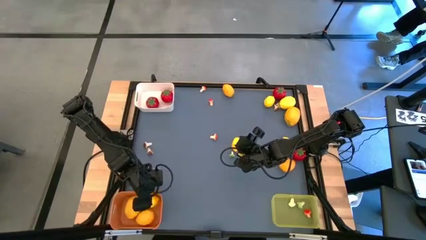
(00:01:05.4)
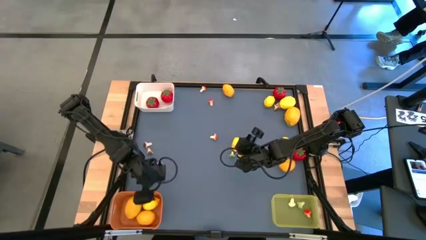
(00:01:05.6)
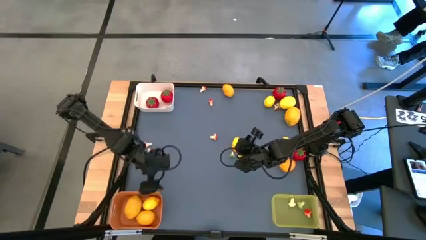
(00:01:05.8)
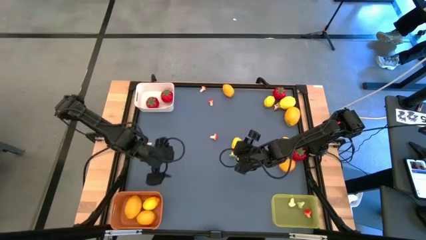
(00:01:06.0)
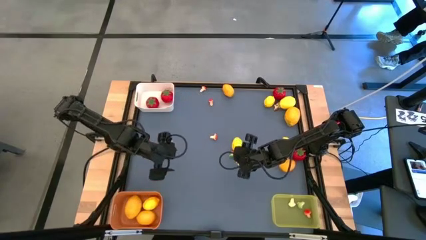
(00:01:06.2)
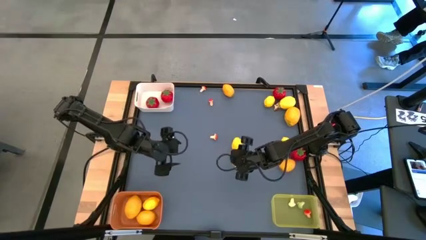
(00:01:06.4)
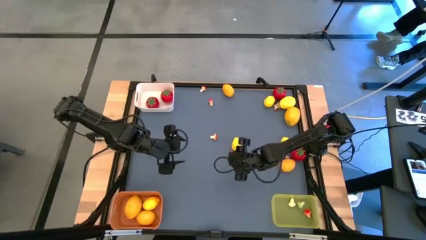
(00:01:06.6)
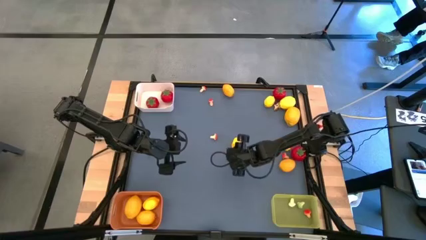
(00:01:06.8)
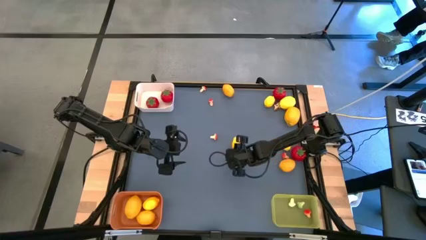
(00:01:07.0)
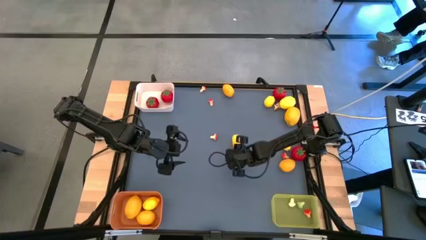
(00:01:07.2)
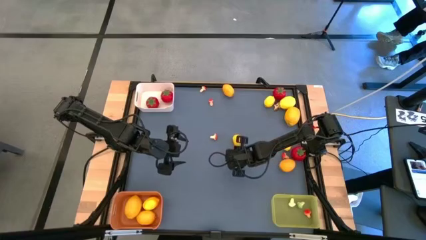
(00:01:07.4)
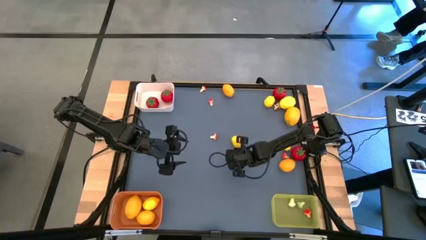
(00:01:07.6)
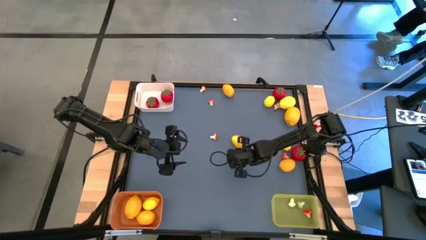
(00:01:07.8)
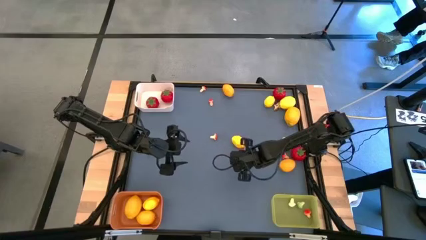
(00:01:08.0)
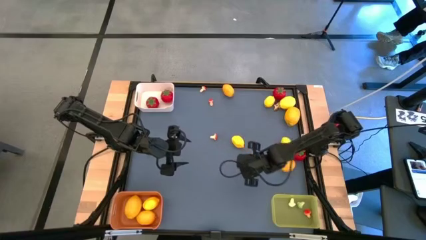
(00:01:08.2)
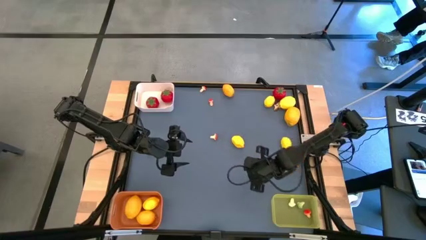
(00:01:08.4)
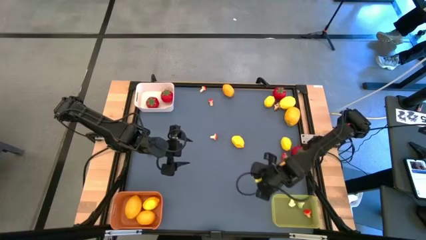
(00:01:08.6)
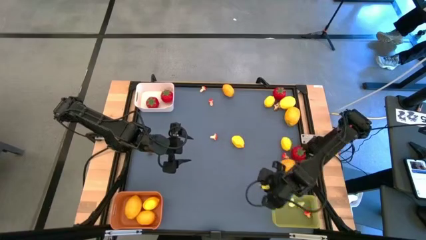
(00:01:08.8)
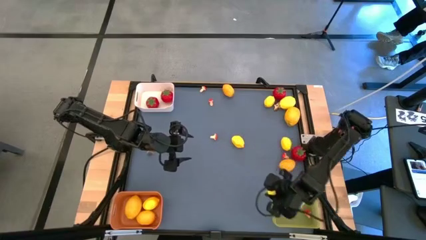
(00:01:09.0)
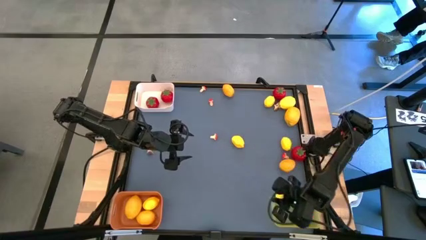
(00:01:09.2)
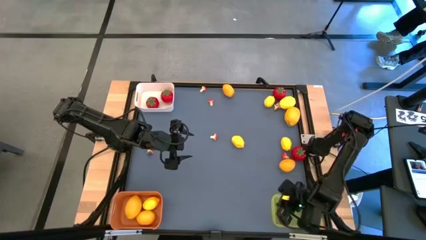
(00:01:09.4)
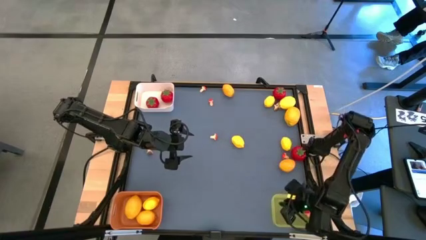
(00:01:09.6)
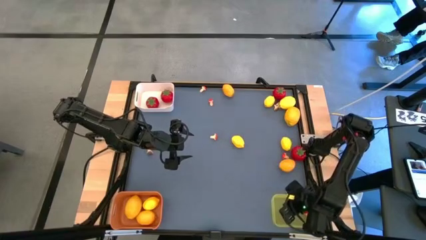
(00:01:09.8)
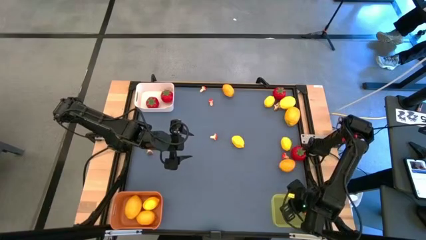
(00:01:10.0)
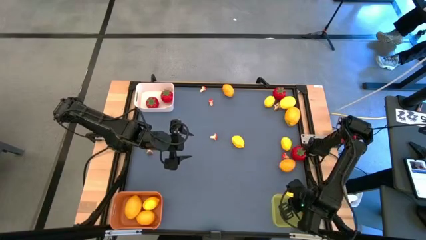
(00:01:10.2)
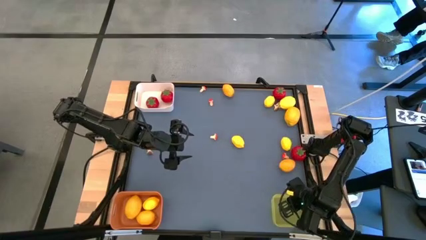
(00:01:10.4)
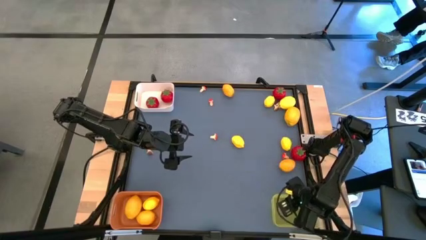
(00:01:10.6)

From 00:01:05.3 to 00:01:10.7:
Task: Sort produce into baskets
Put the green mushroom into the yellow bin

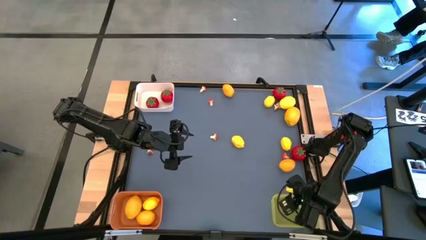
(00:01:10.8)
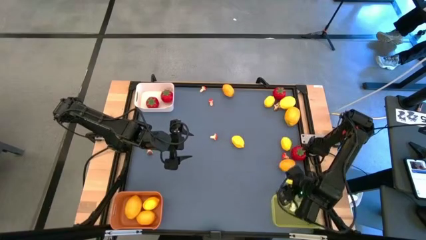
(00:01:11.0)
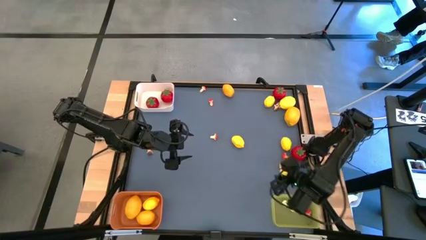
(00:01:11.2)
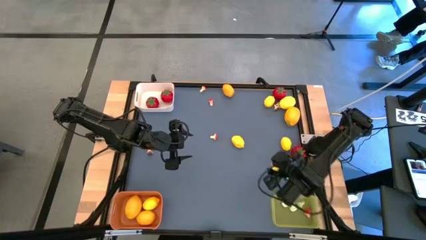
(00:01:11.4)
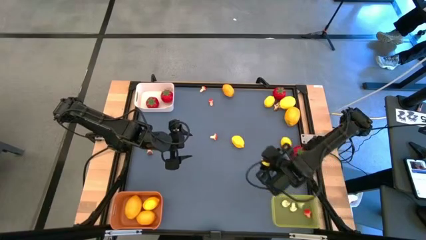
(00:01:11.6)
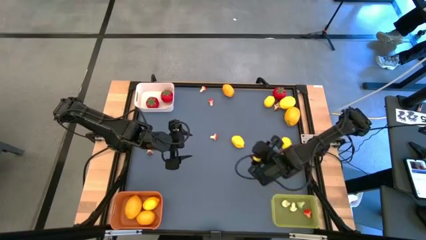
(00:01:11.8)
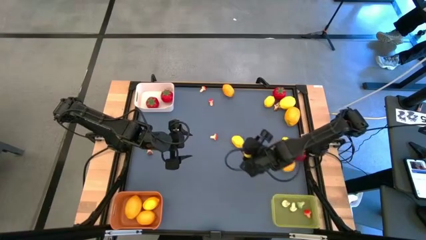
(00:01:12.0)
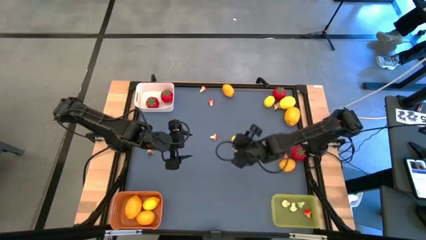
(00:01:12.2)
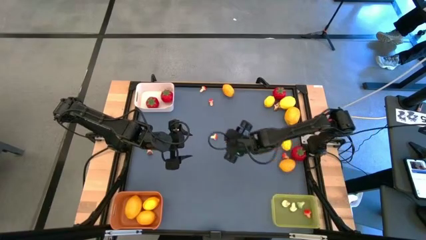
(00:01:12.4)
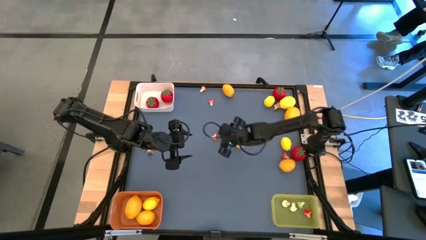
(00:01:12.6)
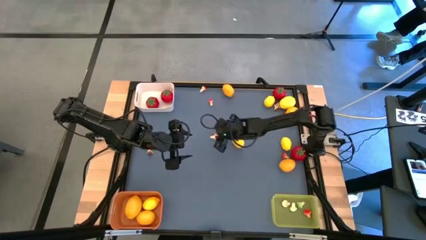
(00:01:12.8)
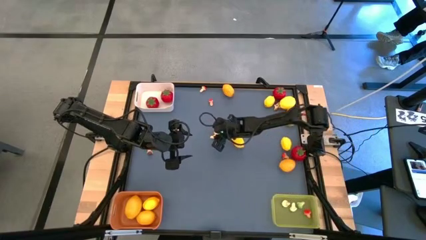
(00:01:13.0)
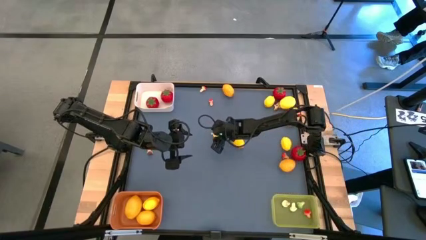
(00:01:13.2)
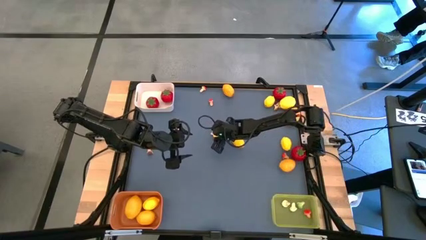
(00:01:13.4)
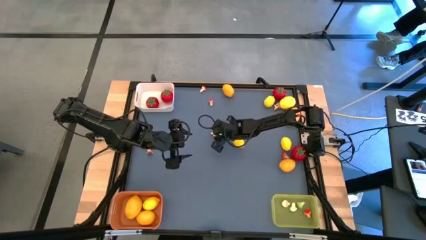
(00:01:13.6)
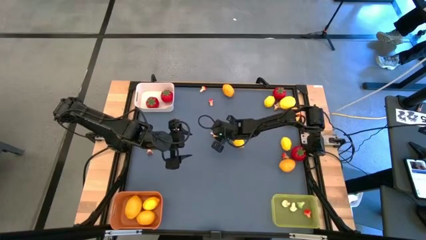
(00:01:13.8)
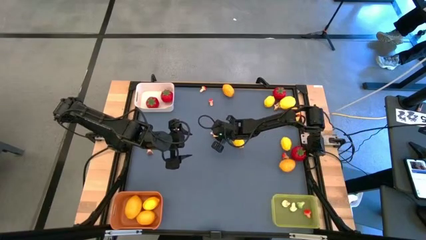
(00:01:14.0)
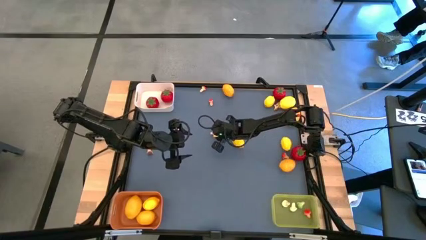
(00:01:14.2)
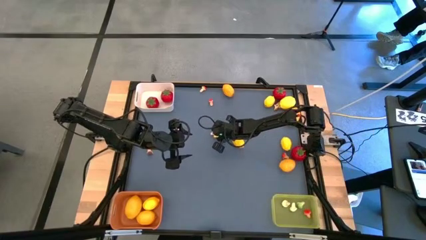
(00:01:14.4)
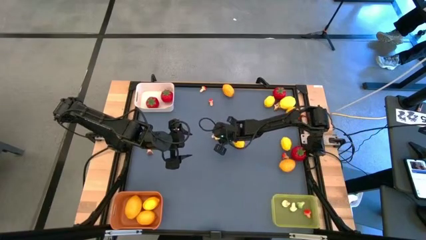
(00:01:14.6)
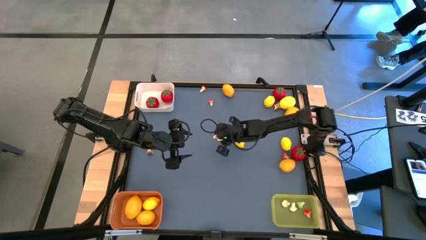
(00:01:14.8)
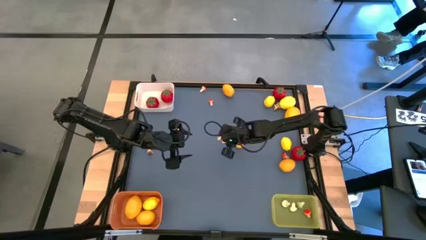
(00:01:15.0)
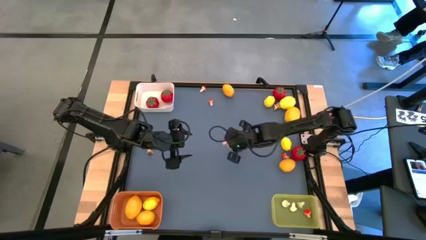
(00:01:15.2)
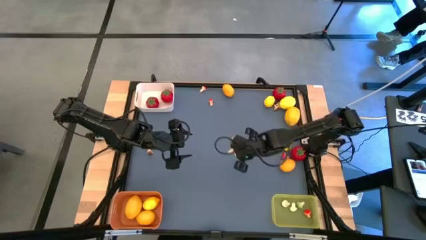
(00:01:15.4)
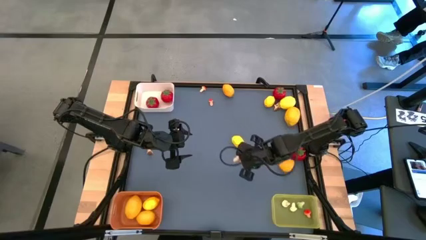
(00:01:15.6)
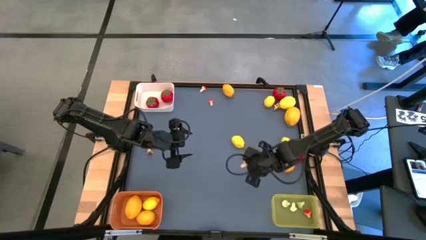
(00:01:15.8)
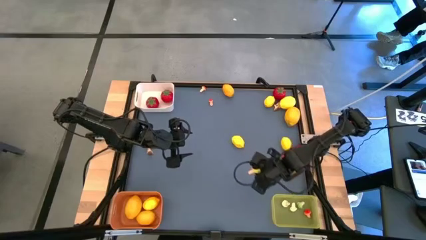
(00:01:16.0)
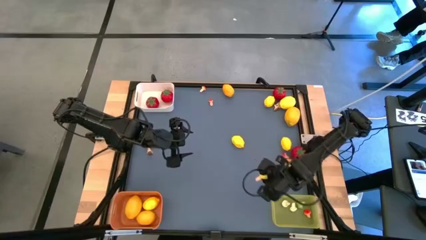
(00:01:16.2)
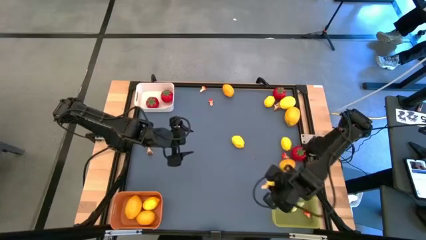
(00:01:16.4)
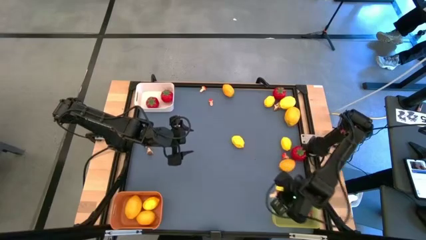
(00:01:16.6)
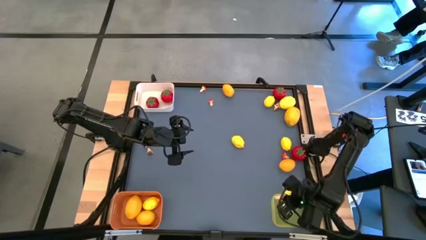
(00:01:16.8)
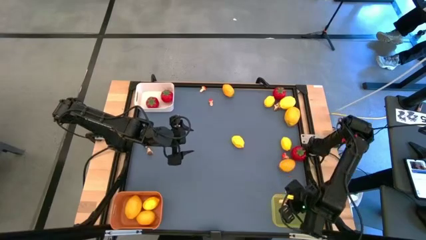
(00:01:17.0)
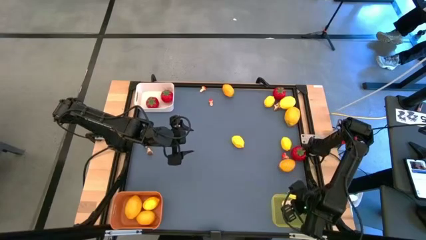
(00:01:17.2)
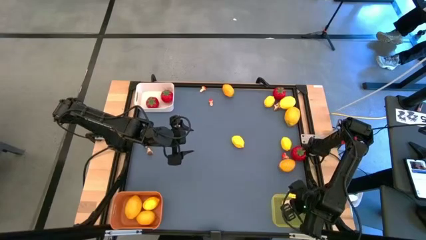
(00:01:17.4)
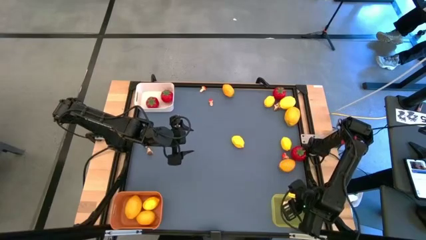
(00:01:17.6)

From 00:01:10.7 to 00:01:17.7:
Put the red mushroom into the yellow bin

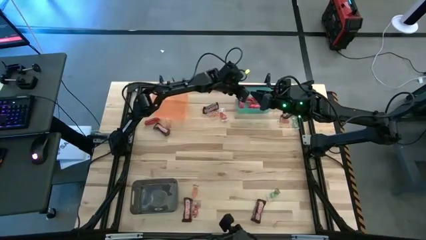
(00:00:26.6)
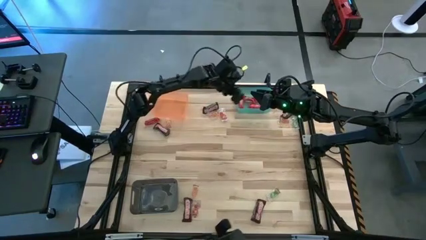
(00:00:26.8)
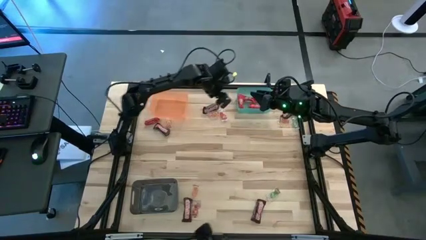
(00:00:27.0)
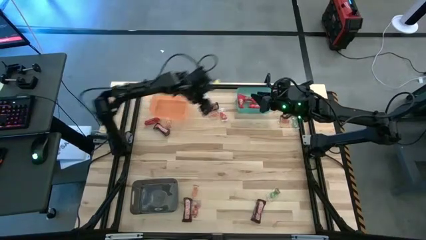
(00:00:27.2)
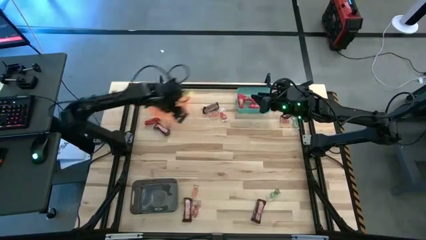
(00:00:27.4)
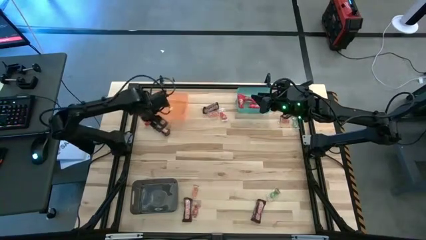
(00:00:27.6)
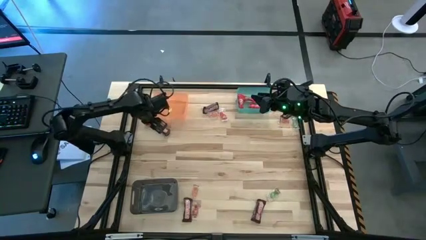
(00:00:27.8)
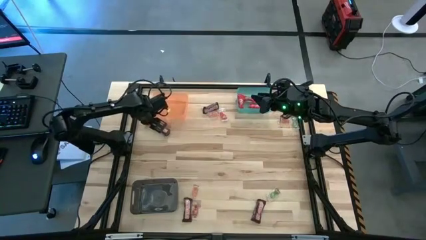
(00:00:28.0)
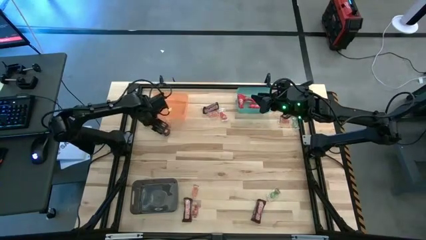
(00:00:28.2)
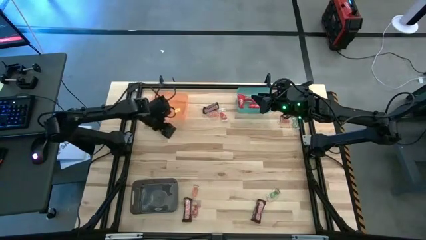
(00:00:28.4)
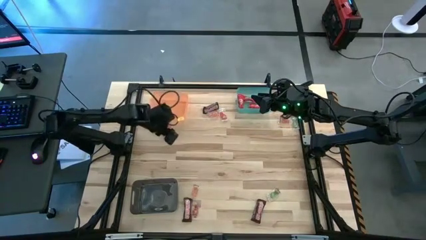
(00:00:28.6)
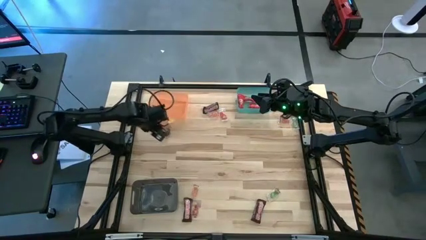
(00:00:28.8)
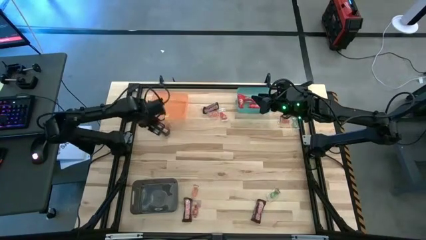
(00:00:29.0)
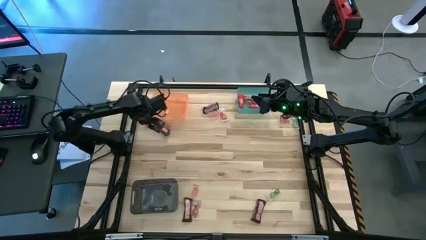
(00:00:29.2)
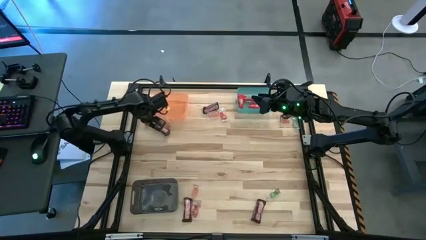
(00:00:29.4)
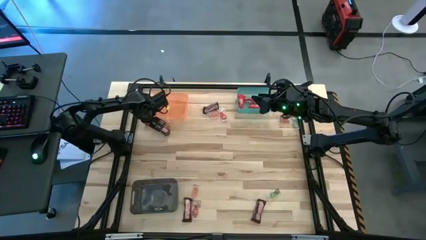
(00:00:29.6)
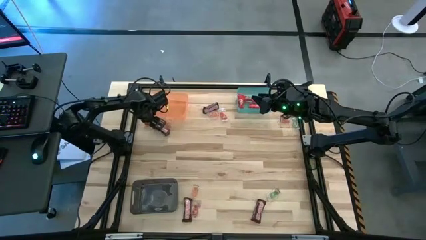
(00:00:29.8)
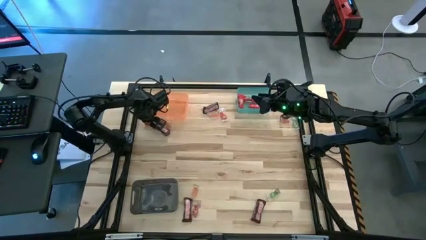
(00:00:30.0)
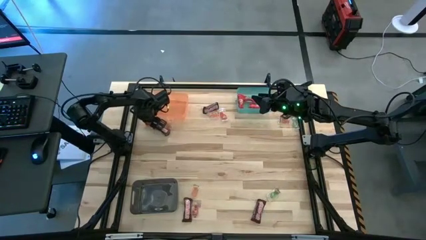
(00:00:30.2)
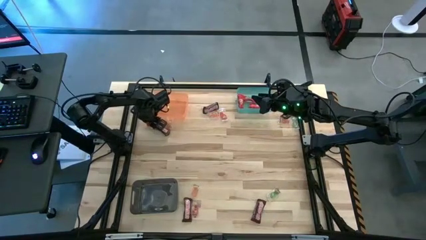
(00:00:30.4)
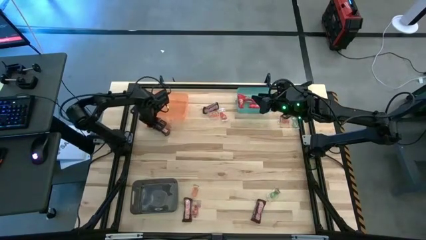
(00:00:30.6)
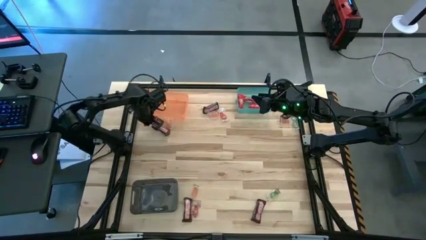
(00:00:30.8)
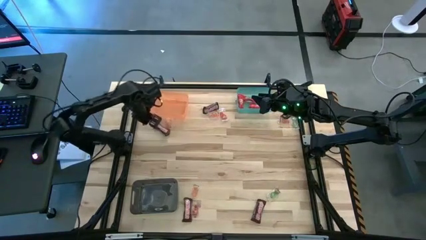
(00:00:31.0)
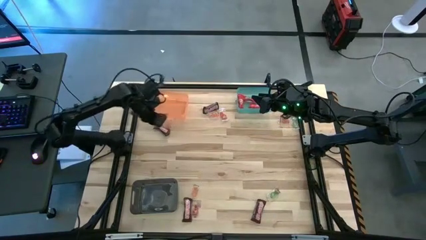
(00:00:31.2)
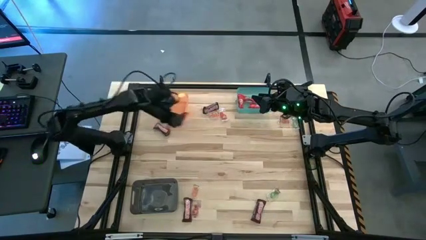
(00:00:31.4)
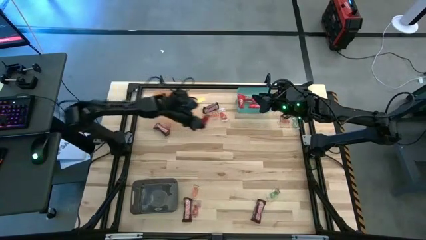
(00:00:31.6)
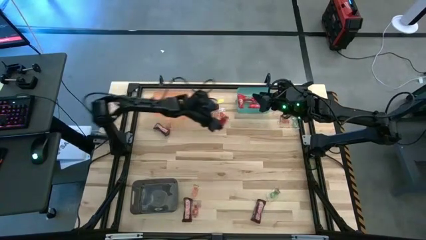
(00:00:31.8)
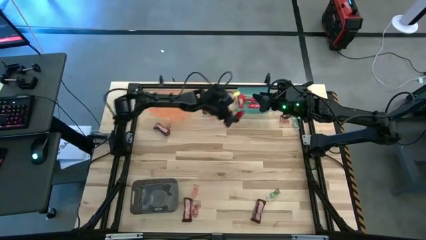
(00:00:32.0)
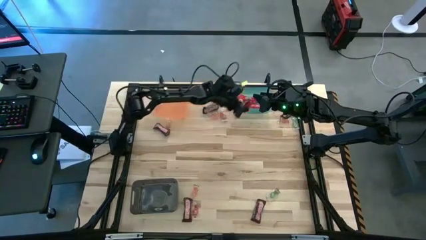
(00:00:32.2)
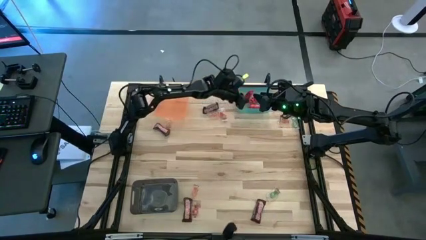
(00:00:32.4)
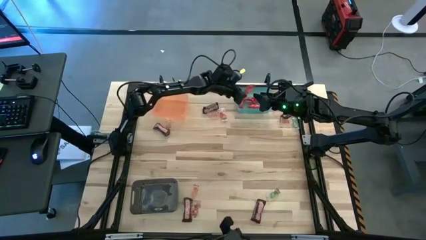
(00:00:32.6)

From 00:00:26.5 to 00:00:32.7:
Task: Sort candy by brand, put in halloween buckets
Put the red chocolate bar into the blue bin
